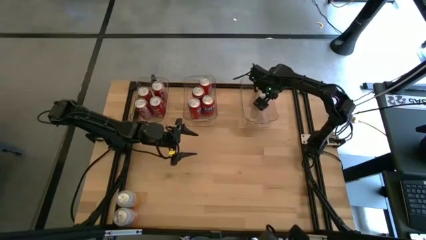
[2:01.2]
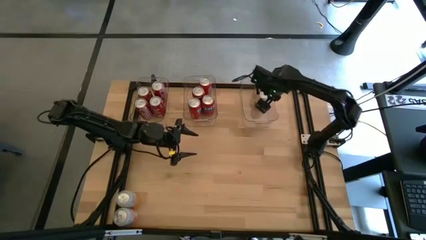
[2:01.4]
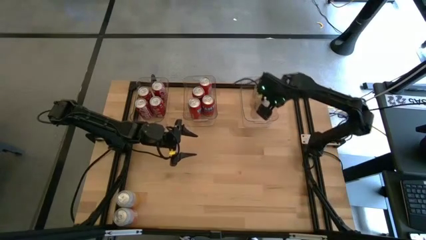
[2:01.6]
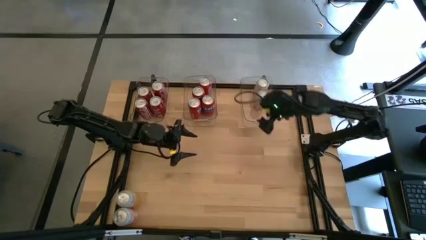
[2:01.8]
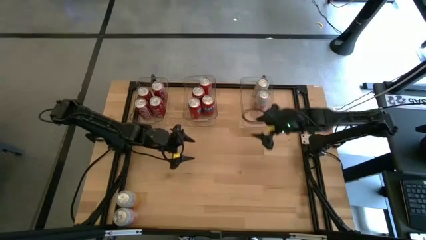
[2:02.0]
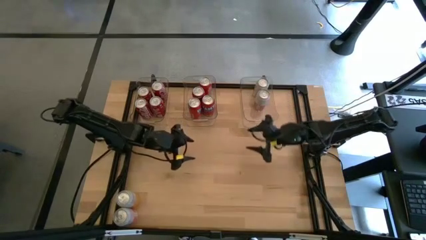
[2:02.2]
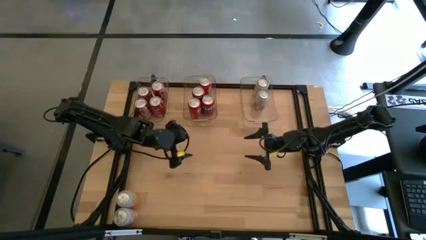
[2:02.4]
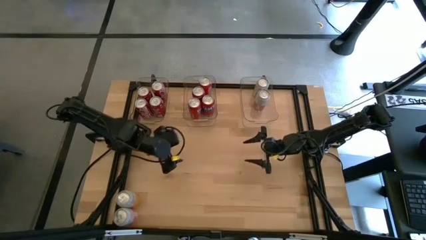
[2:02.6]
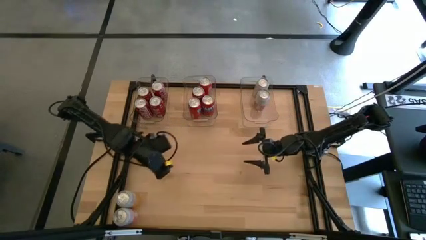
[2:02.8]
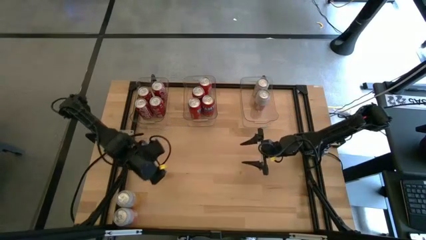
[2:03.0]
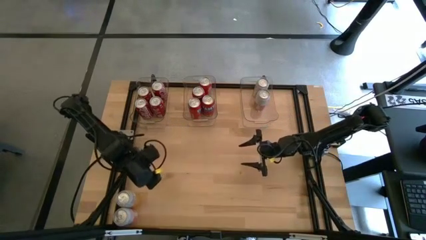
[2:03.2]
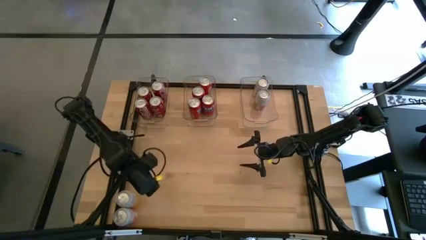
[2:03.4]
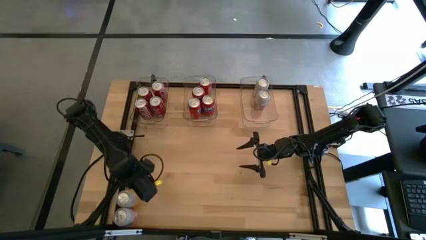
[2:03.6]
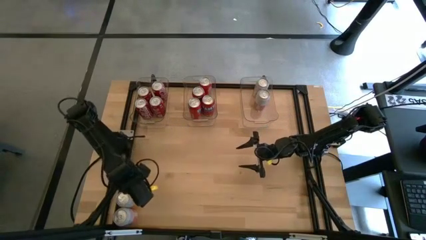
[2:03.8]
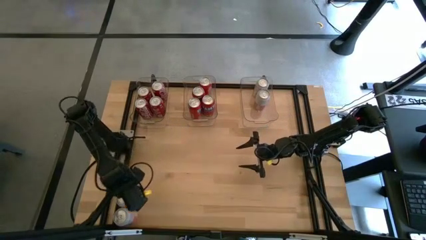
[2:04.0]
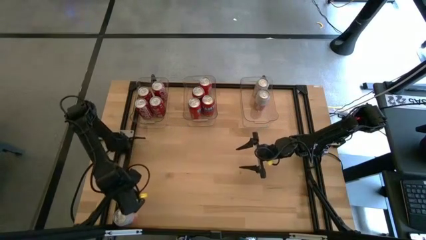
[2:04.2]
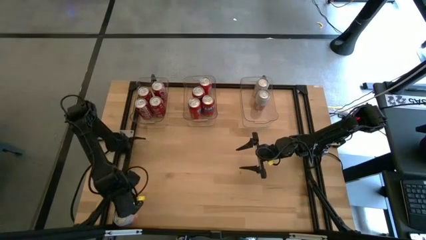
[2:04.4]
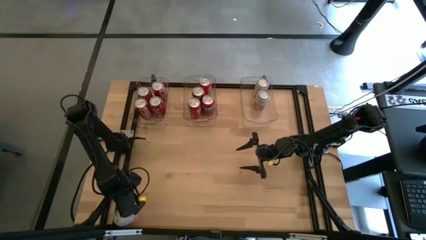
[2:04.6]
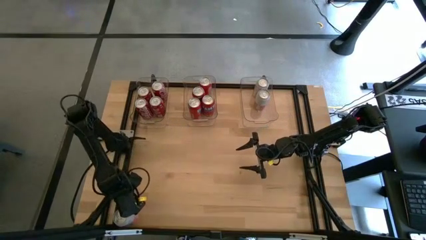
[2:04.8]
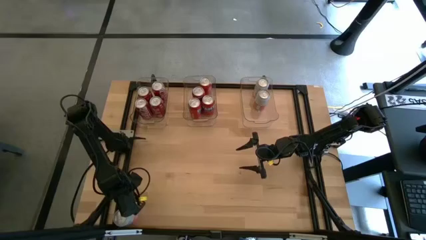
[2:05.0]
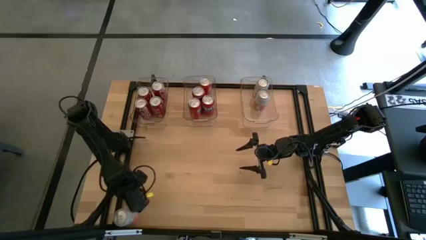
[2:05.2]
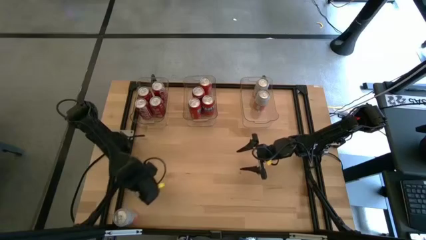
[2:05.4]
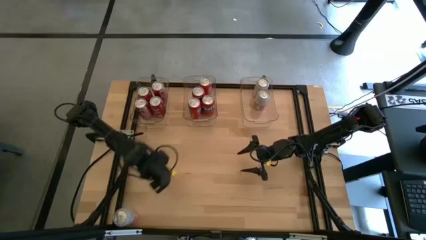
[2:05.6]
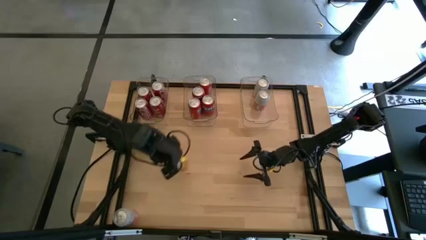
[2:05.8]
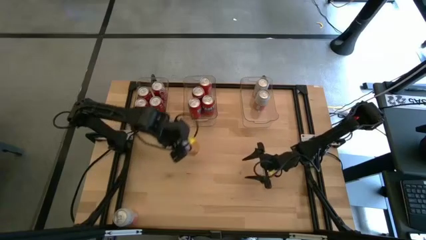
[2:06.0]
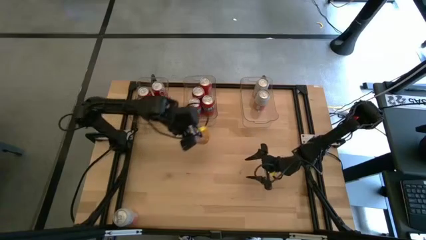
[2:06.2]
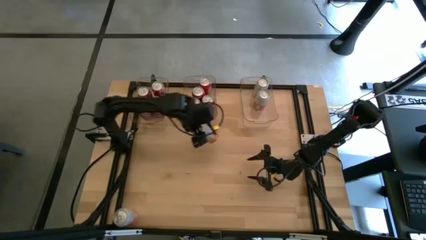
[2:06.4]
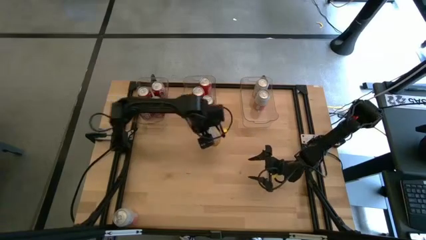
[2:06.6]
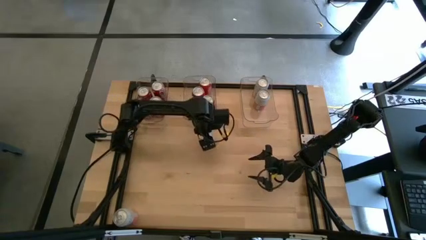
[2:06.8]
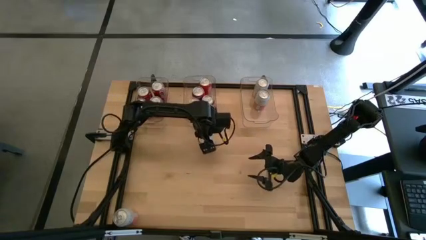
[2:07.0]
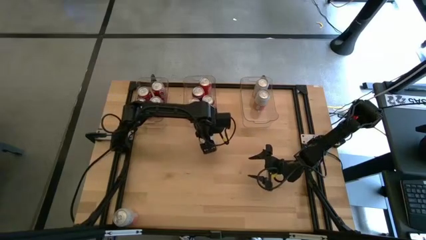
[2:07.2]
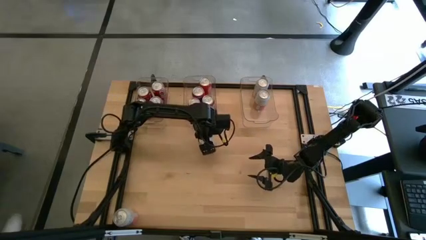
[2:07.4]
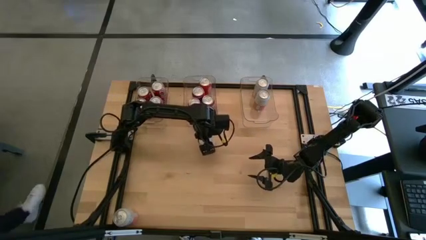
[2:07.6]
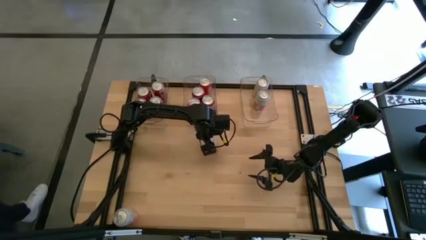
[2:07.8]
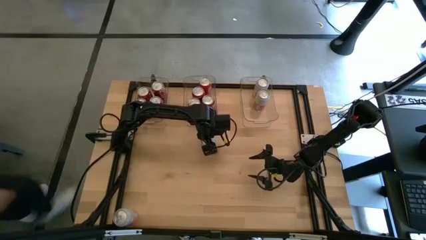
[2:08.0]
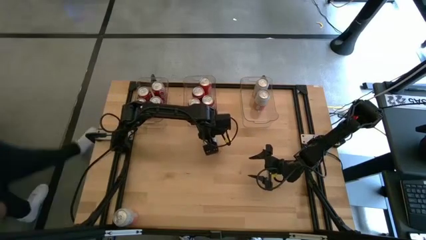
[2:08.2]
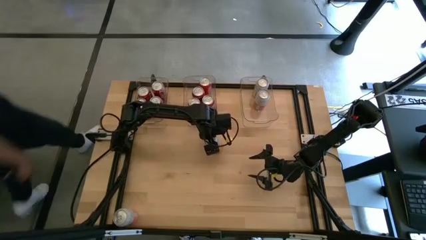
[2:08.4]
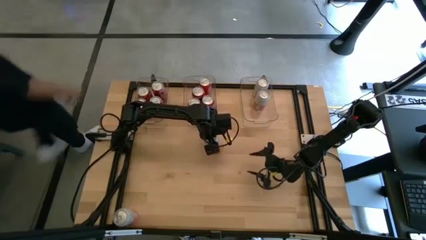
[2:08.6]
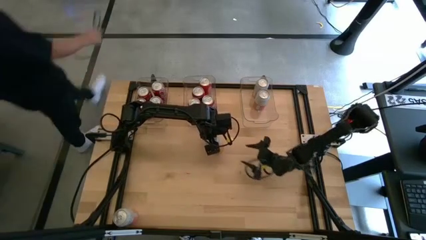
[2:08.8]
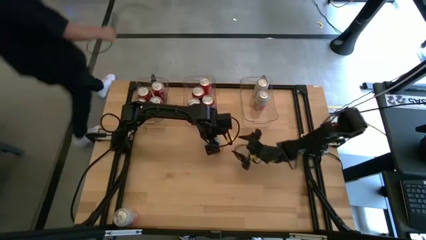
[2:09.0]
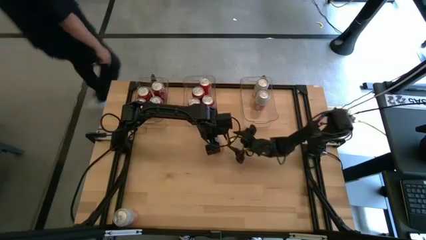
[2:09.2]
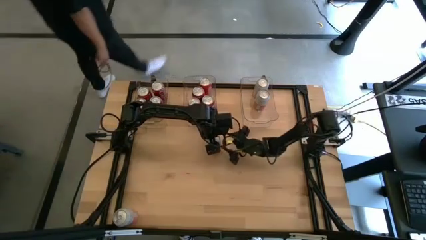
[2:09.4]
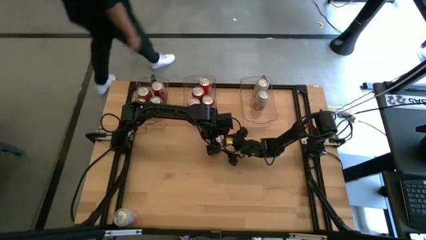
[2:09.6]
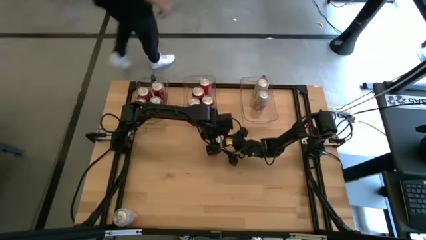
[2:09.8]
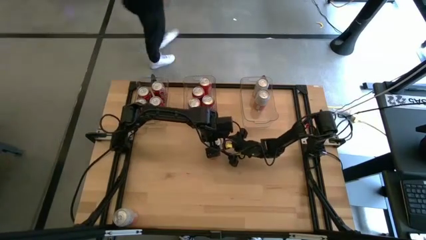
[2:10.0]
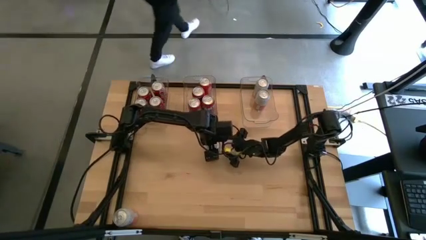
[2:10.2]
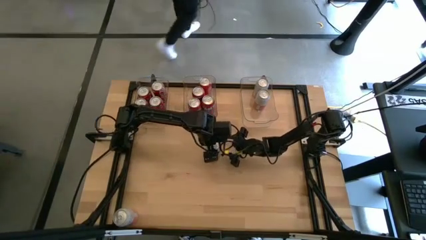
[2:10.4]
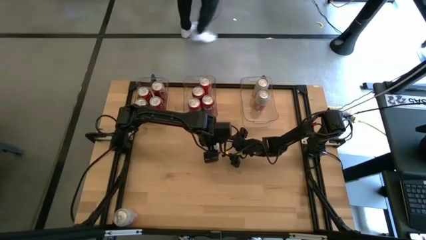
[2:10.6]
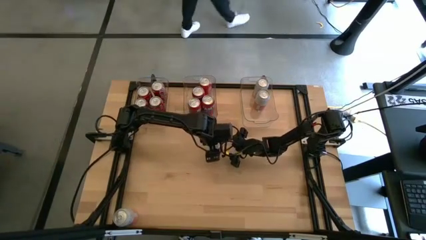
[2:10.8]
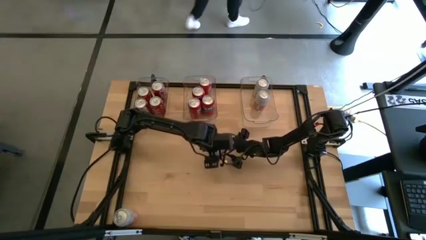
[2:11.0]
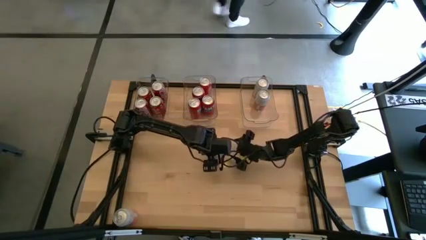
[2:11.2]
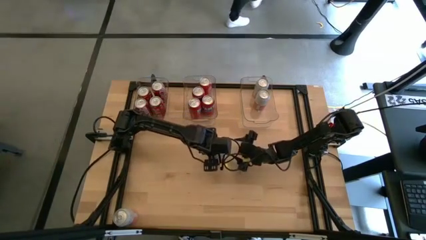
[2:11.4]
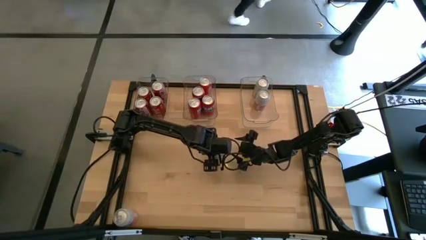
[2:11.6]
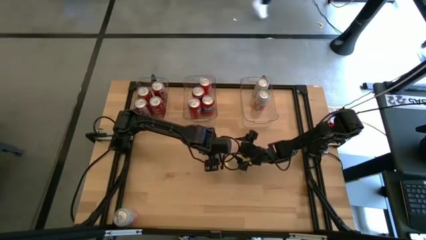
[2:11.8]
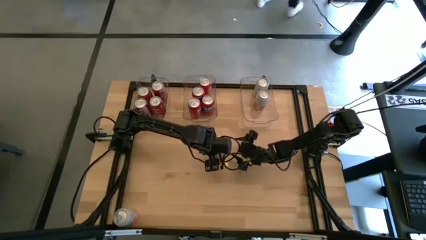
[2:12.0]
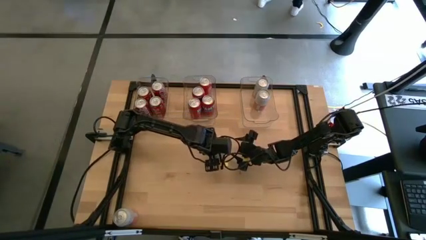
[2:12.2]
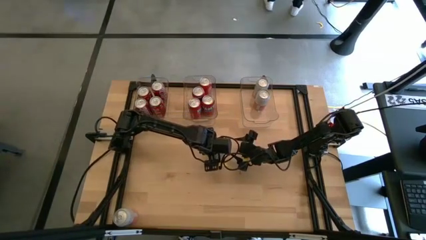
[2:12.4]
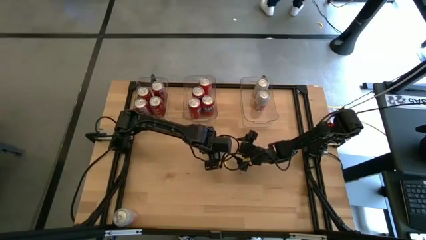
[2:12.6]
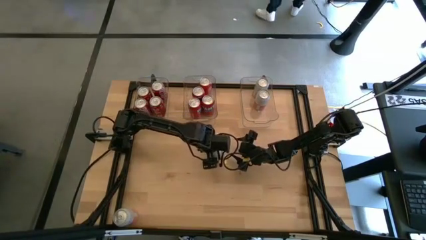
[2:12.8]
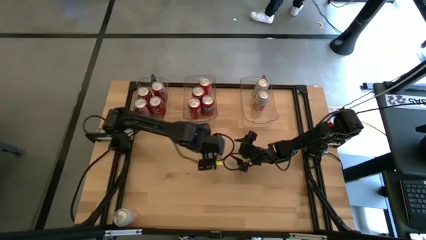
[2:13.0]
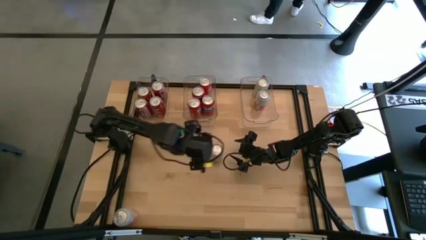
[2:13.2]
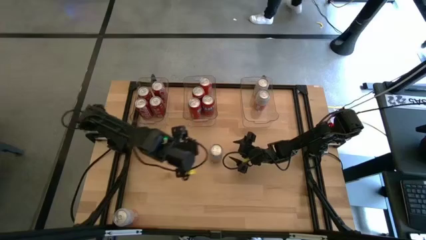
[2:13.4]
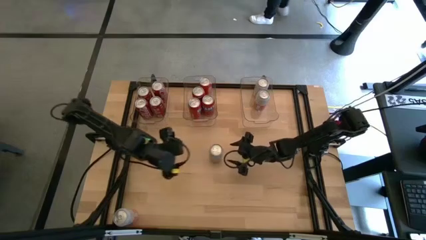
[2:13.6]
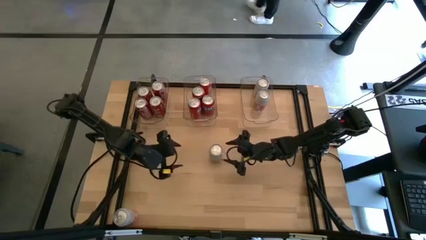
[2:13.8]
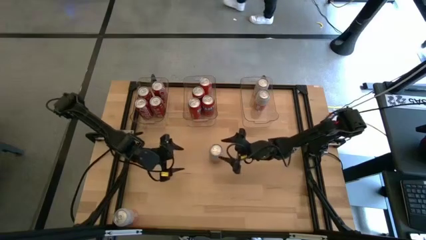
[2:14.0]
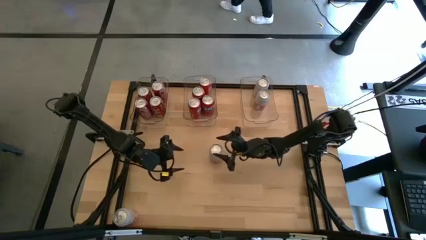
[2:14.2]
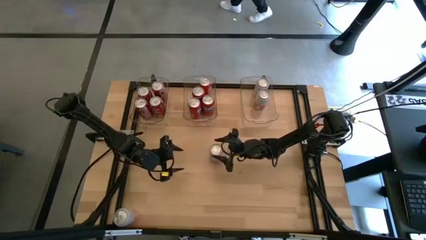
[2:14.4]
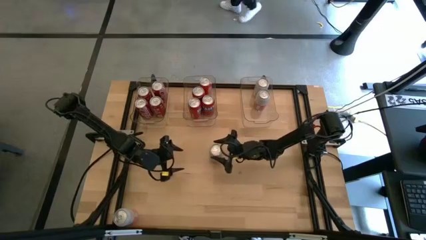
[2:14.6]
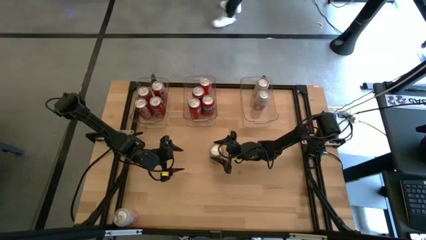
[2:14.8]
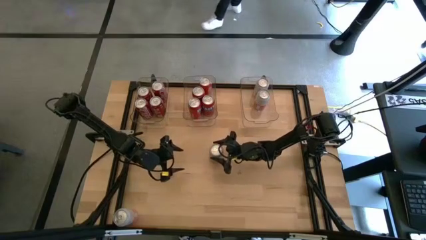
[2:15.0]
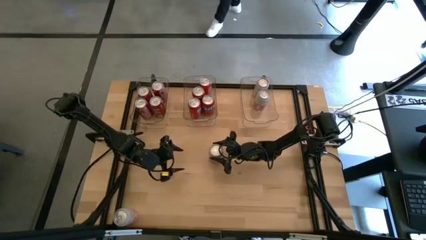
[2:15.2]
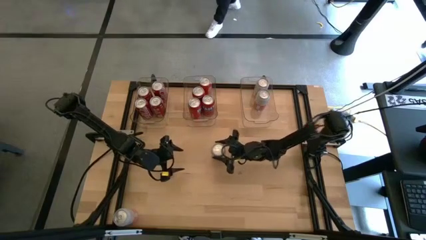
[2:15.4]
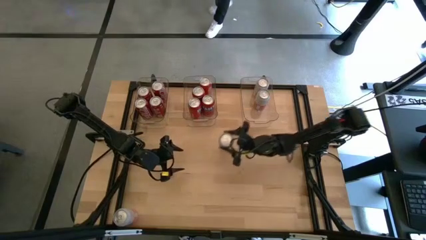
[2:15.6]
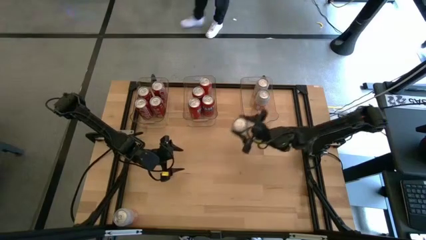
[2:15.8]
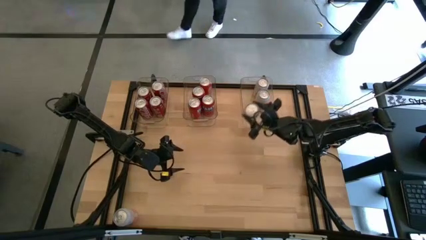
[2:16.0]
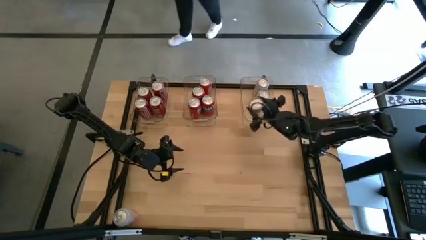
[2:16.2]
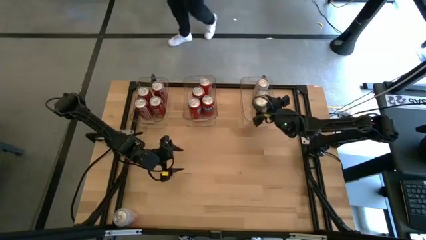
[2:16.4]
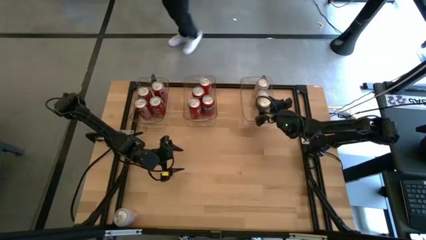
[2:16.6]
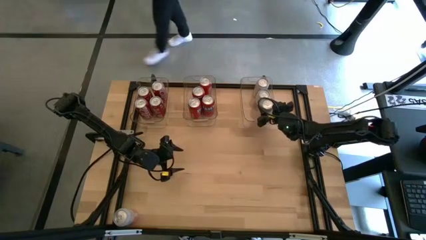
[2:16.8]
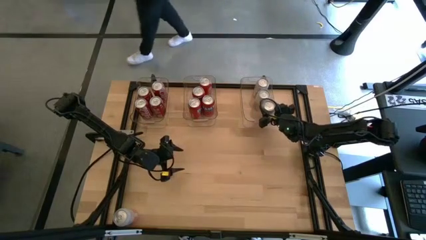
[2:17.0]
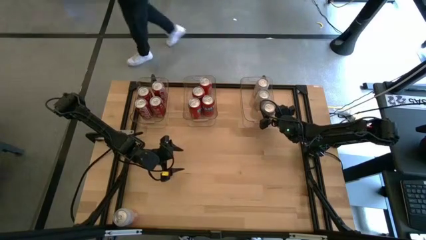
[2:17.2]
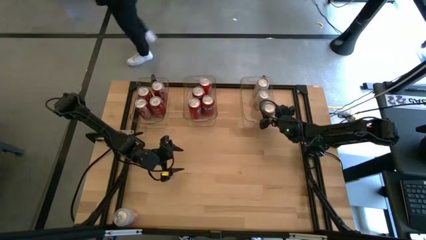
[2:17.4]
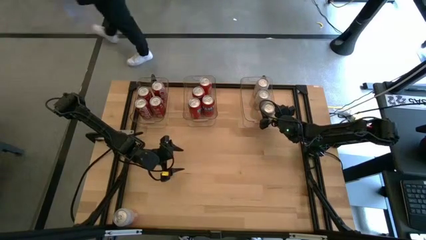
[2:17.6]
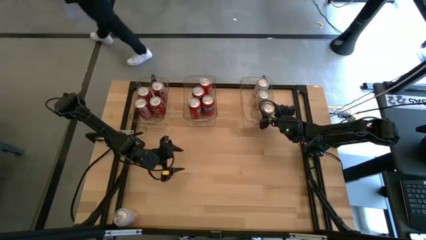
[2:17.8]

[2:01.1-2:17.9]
Task: Sort soda cans
Put the white soda can into the right transparent bin

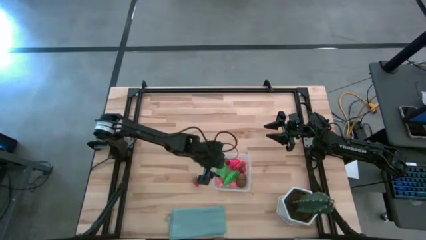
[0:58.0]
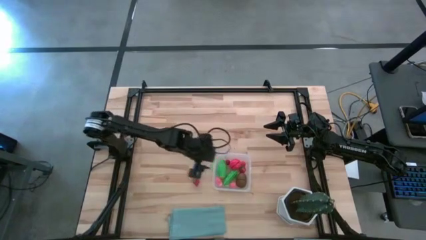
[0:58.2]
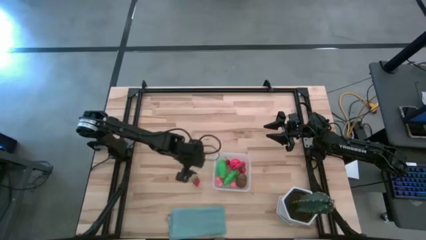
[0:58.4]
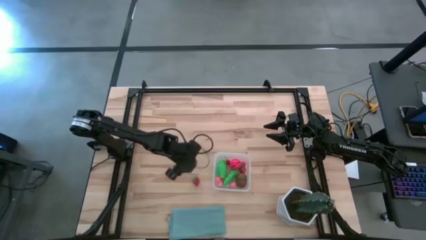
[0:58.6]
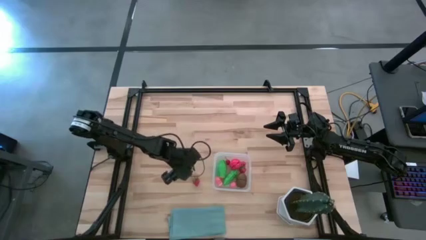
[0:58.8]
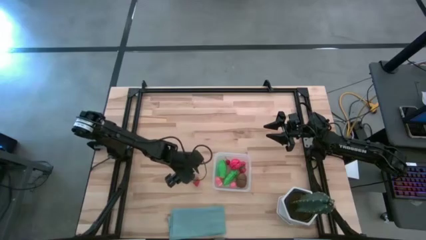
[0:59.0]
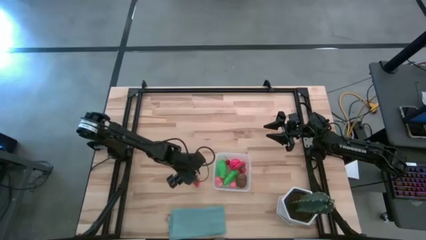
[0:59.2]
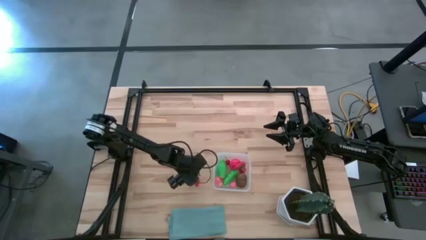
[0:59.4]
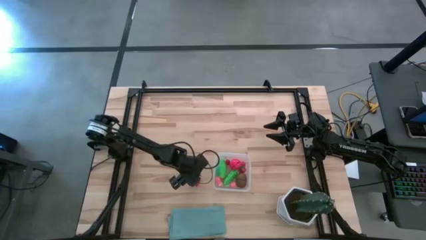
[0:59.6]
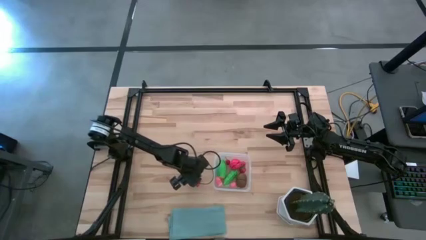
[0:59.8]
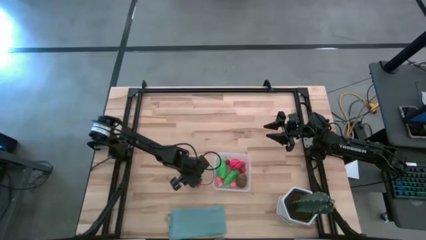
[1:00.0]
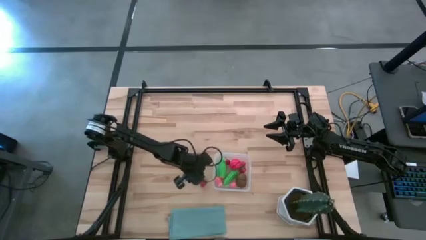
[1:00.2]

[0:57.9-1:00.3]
Task: Pick and placing Produce into tupperware
Put the strawberry into the transparent container
